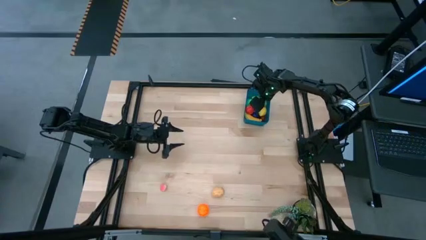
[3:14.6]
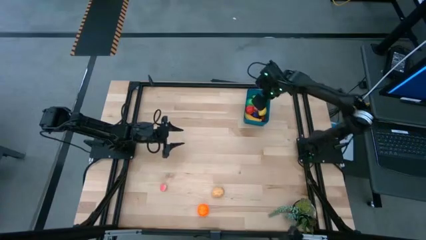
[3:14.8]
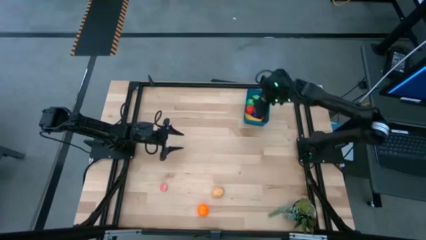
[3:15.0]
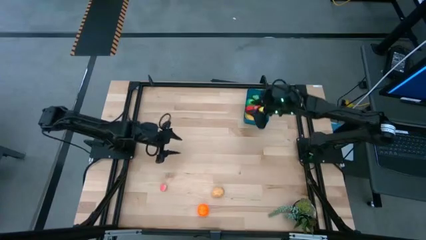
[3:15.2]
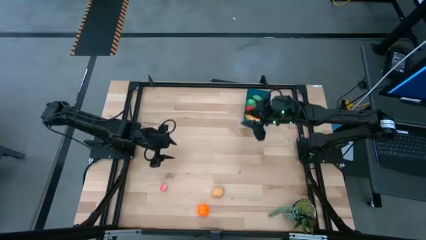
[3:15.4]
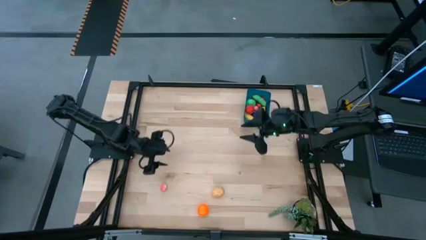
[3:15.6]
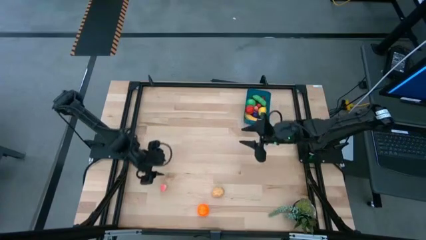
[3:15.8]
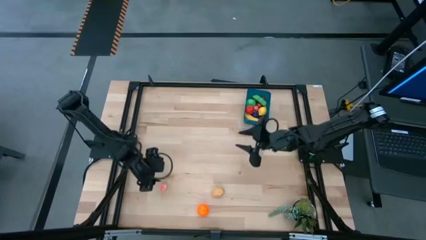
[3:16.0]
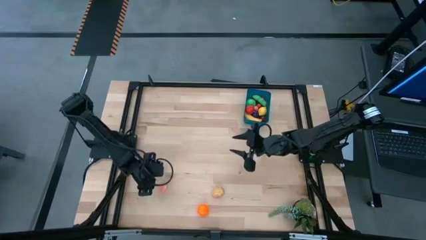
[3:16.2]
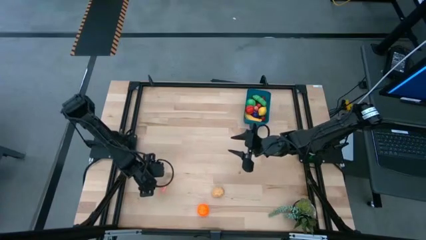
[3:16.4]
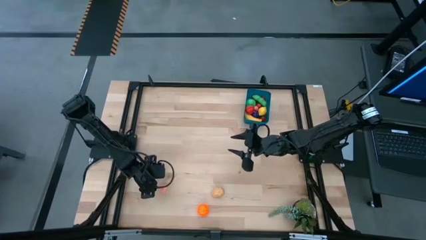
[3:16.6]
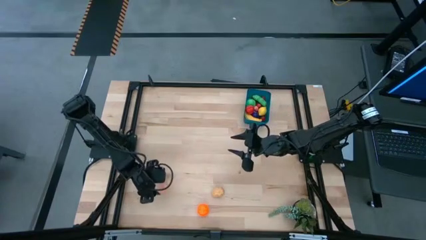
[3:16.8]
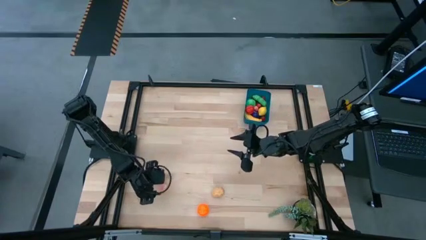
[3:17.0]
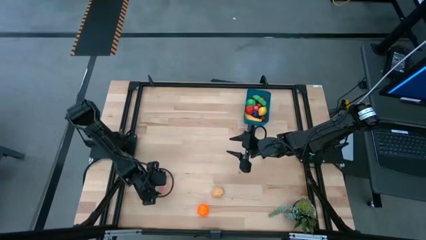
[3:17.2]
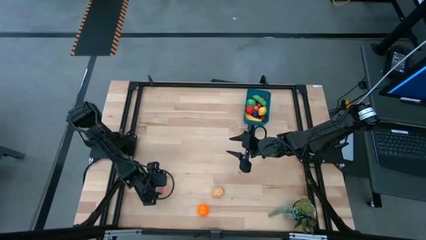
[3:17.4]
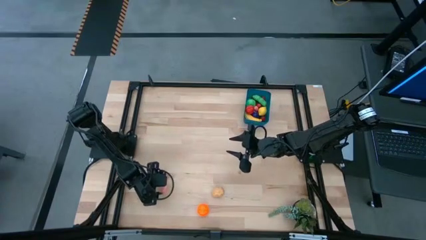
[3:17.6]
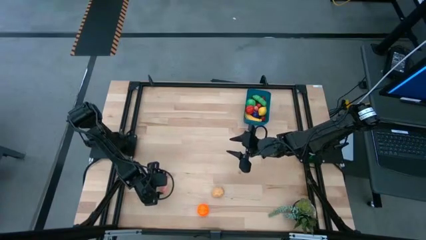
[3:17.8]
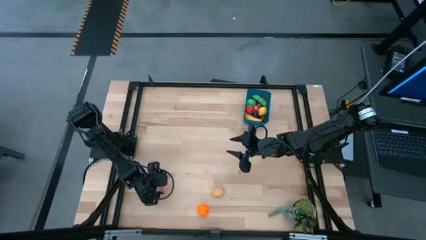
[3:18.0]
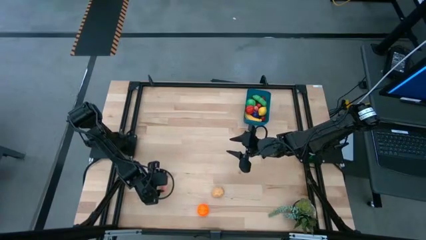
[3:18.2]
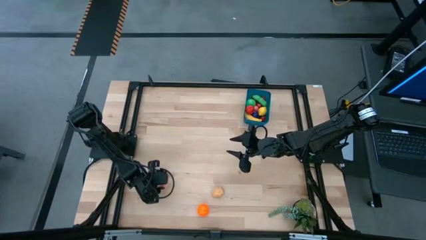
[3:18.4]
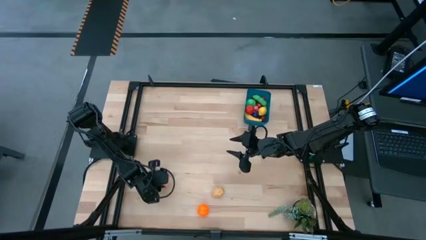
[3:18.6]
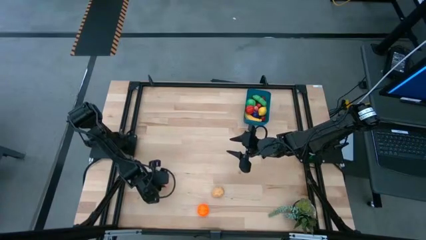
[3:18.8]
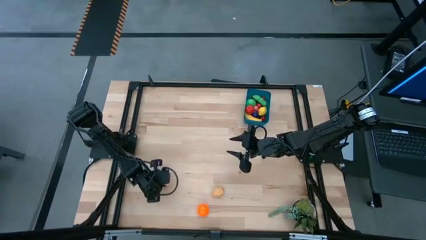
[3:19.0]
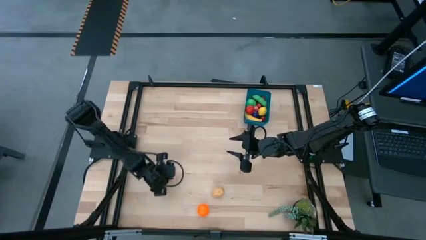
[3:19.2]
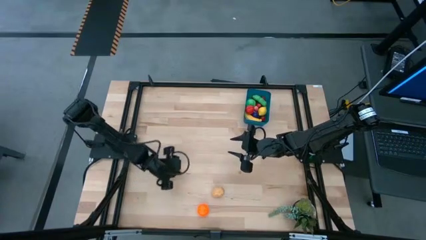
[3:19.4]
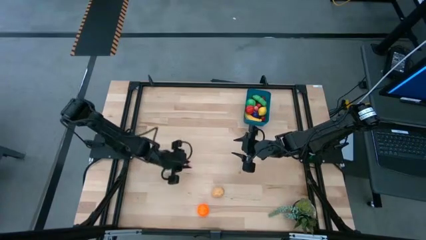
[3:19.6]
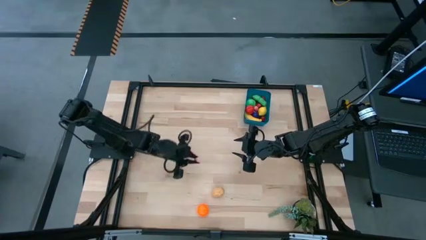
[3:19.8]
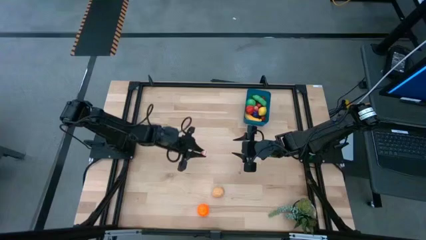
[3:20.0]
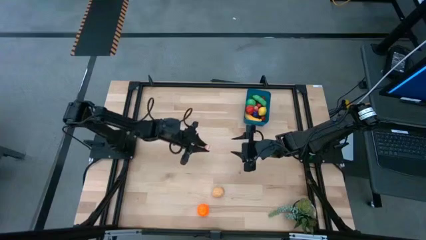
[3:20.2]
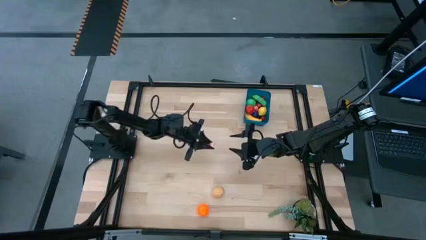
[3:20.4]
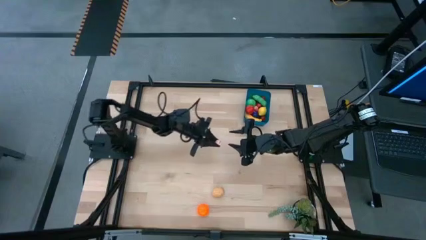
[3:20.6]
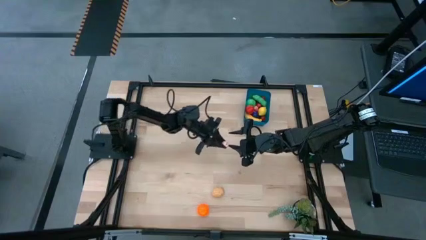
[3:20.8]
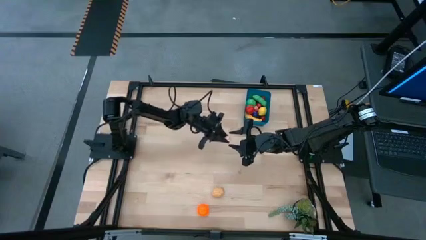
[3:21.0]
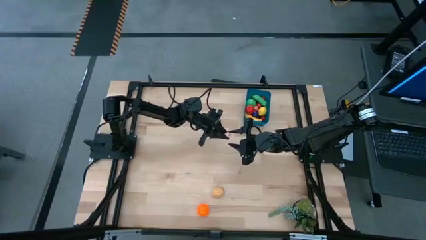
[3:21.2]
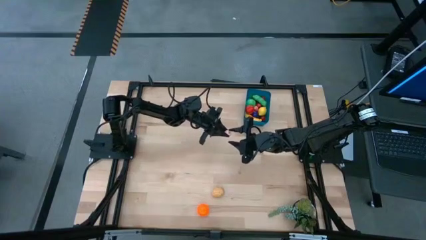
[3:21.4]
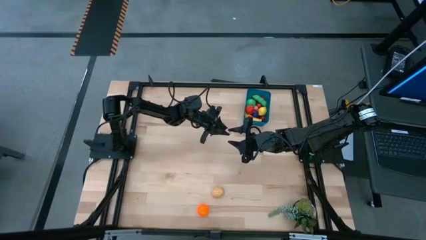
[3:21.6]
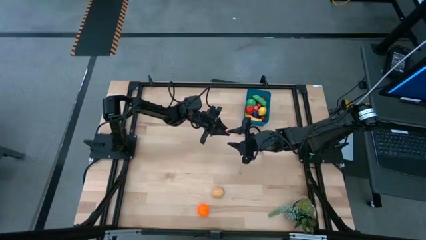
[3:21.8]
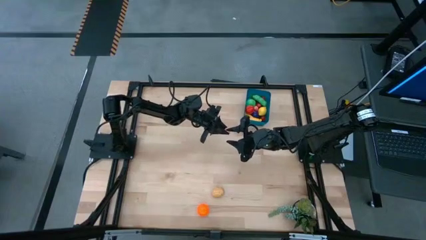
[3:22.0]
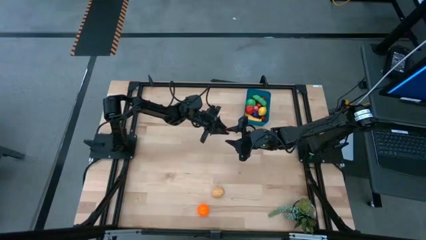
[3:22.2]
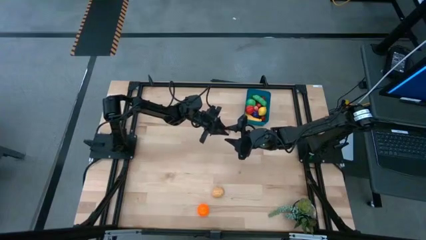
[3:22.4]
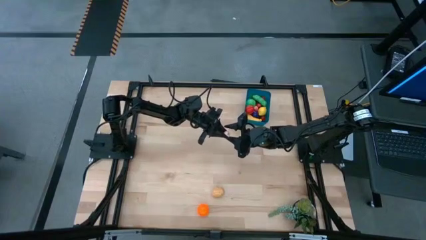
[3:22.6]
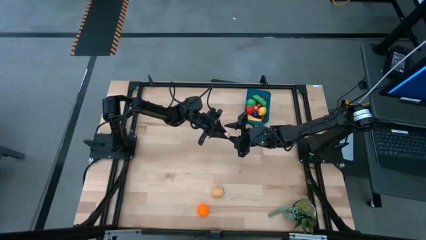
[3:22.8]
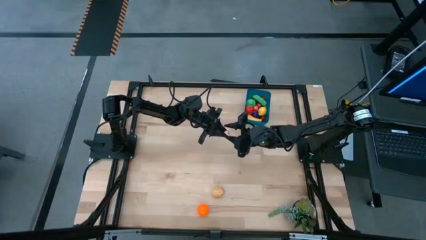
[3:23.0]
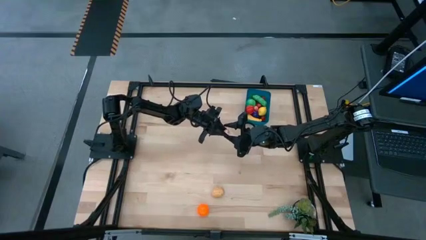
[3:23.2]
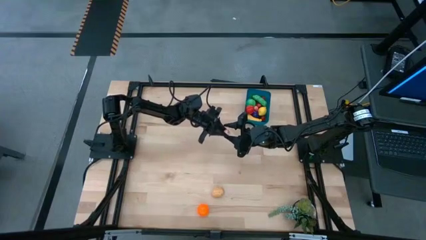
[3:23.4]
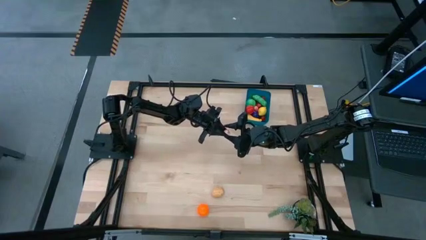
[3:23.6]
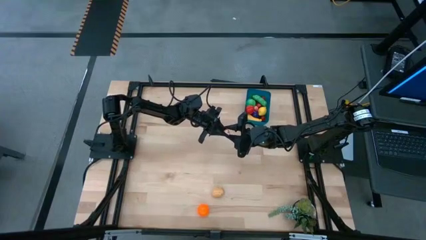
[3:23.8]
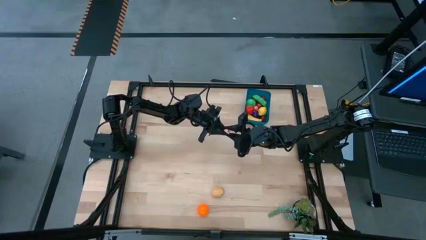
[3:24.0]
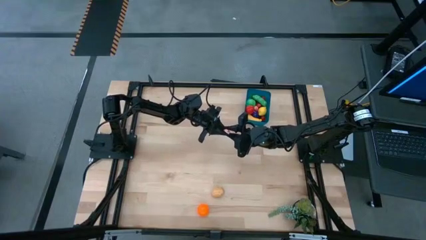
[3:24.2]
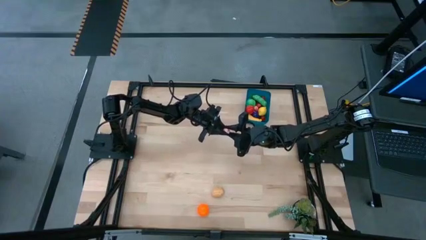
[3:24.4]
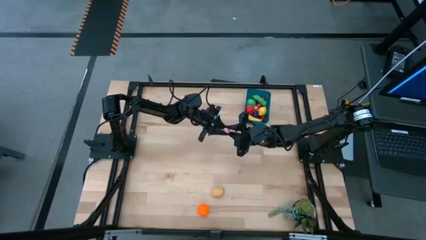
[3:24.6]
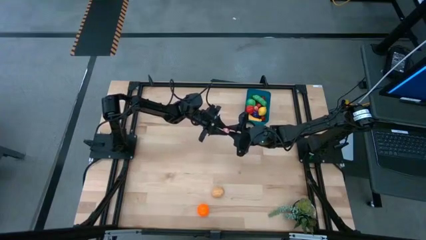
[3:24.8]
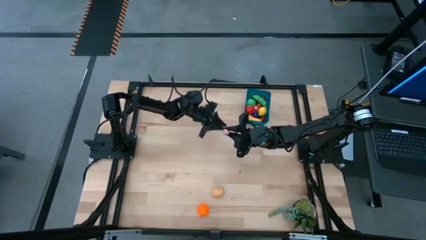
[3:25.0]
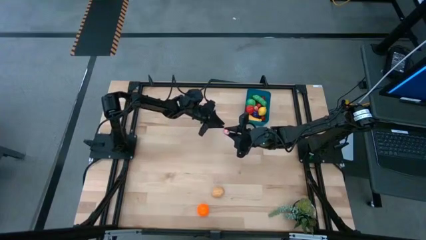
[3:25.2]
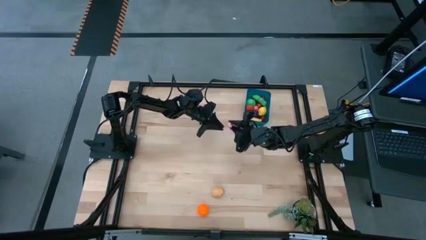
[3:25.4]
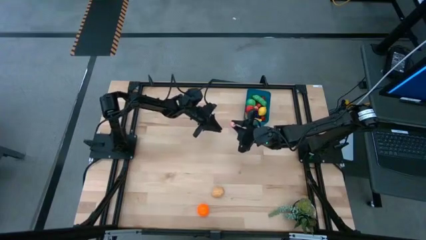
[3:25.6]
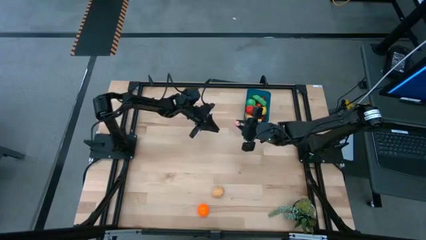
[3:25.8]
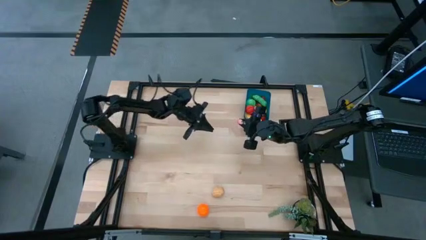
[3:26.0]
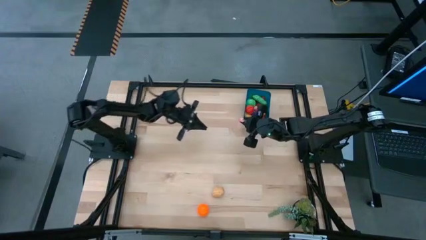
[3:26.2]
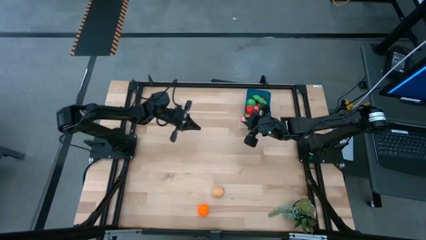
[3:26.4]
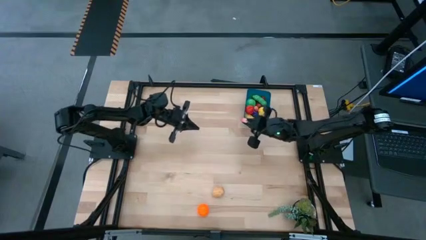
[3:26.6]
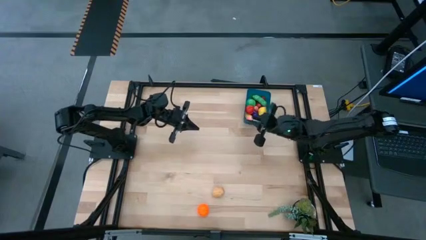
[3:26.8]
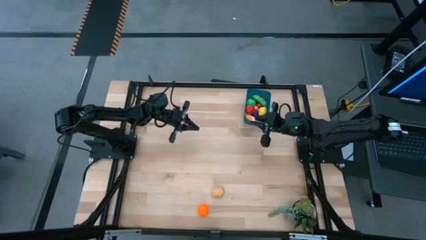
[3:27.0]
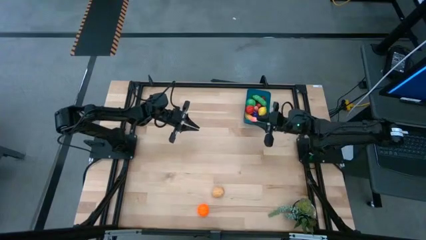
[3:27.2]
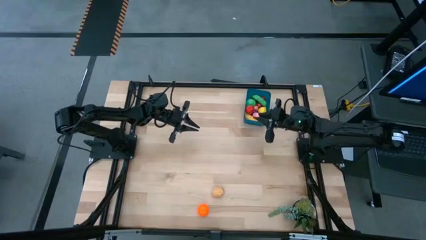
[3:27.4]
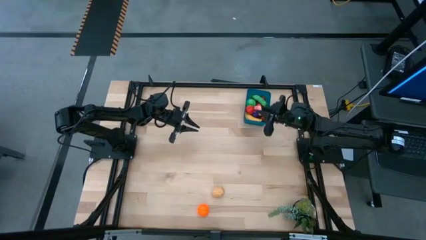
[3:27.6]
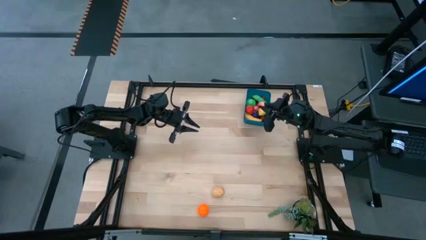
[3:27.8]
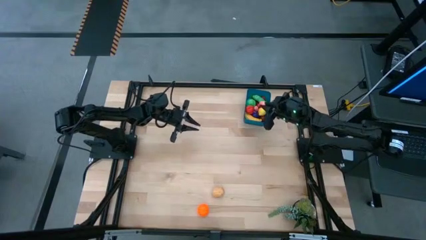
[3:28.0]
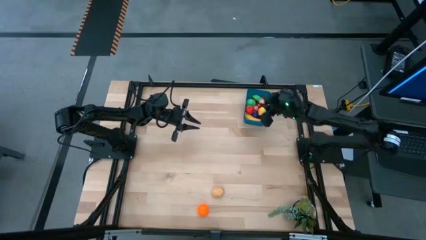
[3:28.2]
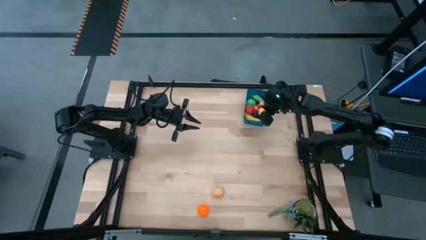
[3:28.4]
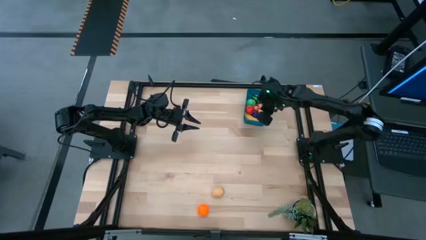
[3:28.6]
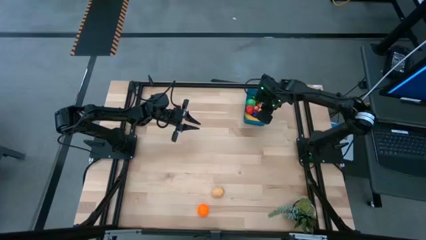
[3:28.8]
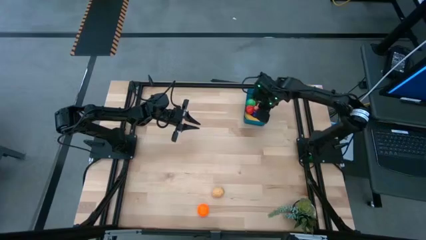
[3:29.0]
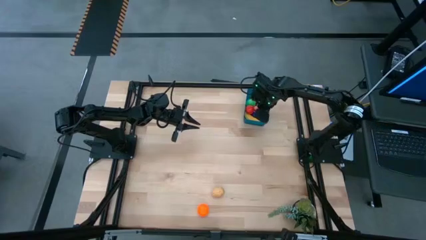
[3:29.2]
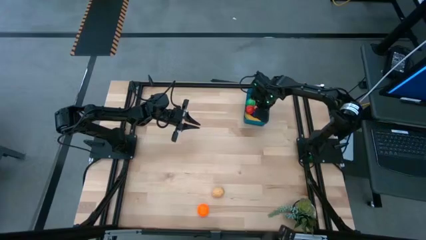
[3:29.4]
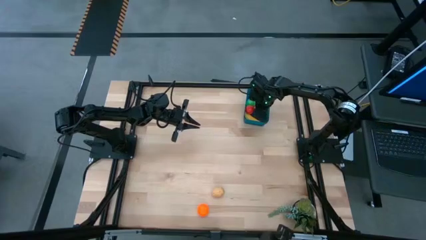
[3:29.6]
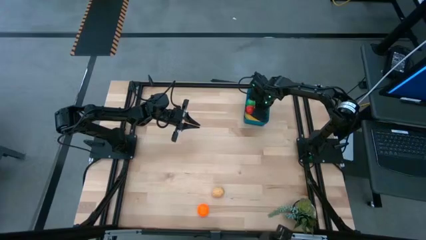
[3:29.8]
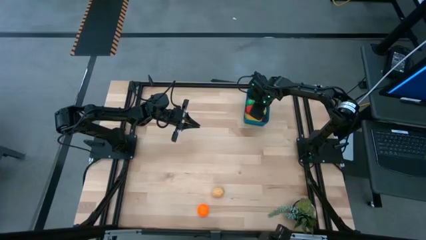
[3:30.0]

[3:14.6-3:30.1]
Task: Pick and placing Produce into tupperware
Put the pink peach into the blue bin

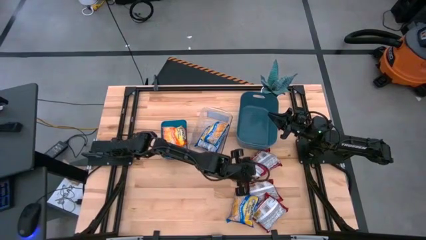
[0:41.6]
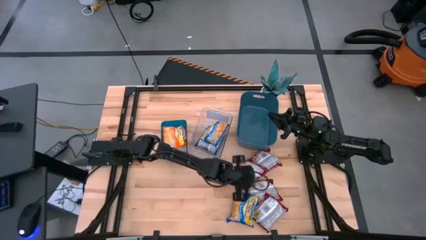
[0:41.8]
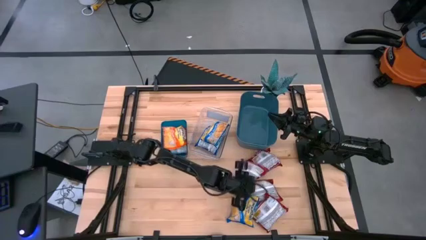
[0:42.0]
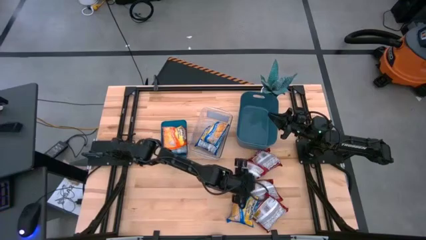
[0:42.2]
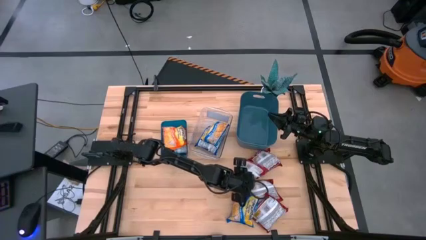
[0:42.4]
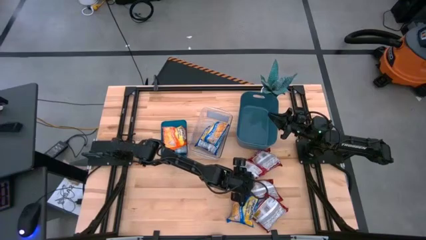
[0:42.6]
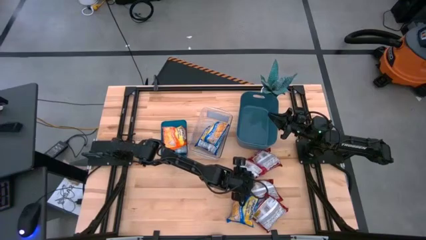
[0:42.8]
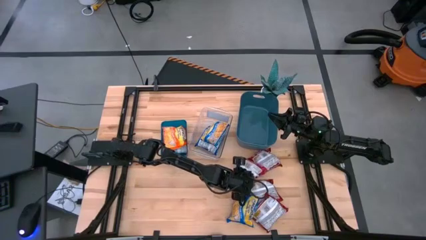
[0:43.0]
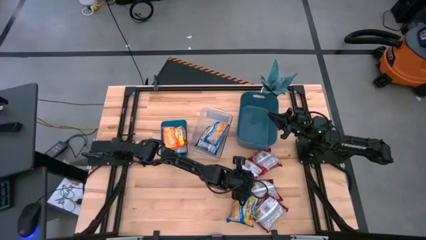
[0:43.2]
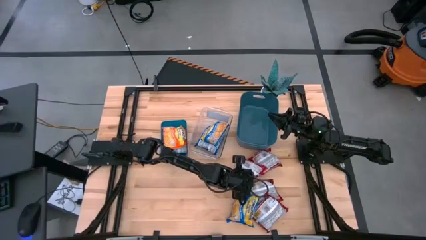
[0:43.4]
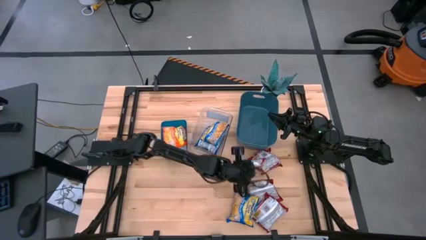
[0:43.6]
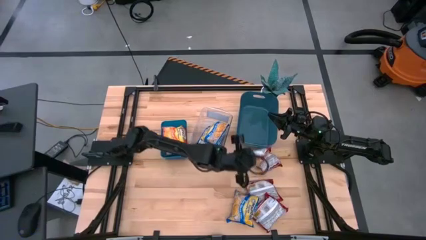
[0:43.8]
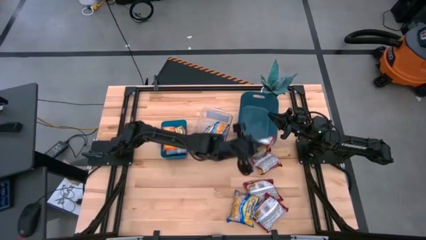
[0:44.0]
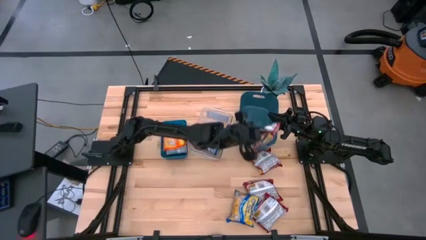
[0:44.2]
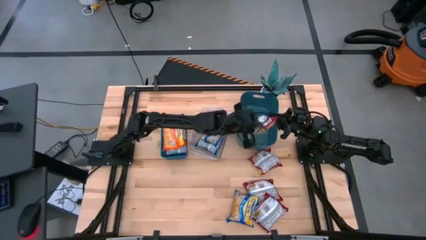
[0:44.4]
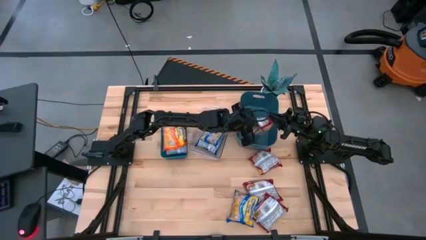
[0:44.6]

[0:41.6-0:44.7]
Task: Sort Maruchan noodles
Put the red noodle pack into the dark green bin
